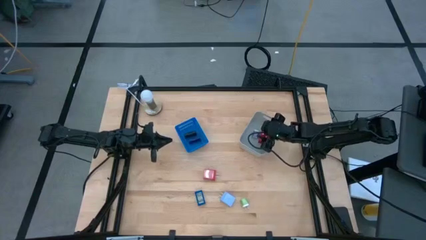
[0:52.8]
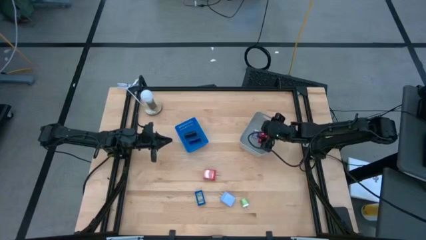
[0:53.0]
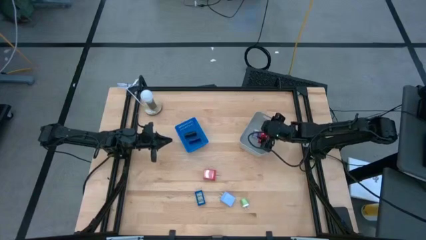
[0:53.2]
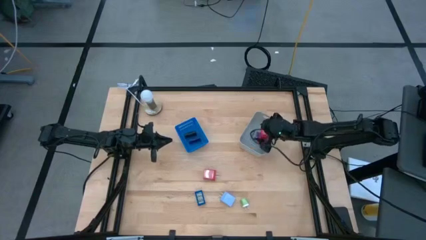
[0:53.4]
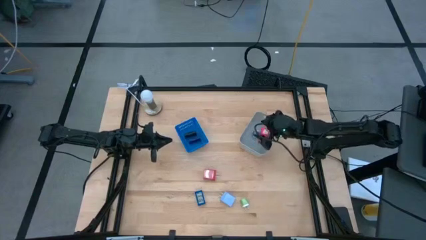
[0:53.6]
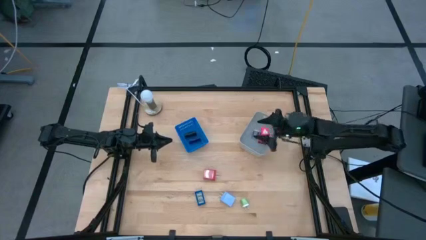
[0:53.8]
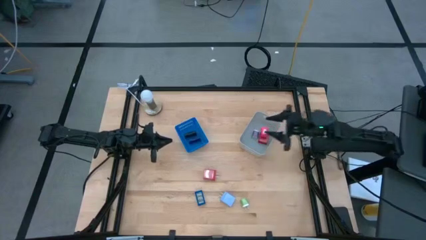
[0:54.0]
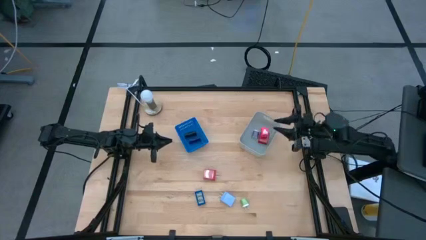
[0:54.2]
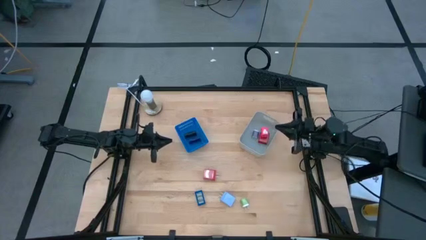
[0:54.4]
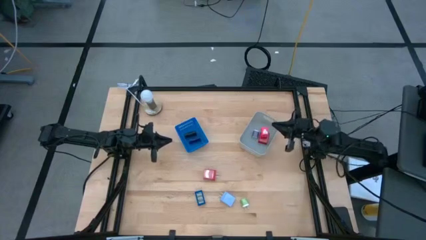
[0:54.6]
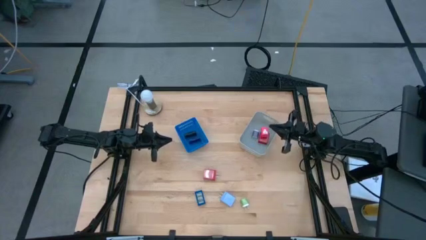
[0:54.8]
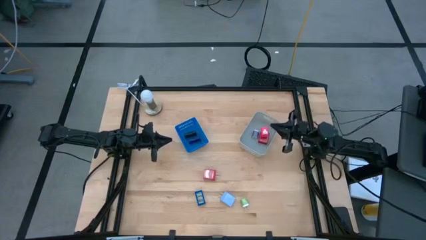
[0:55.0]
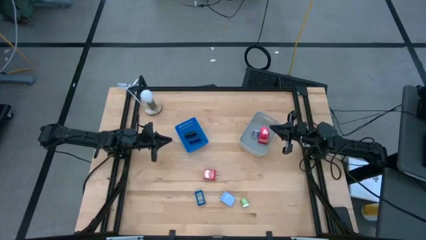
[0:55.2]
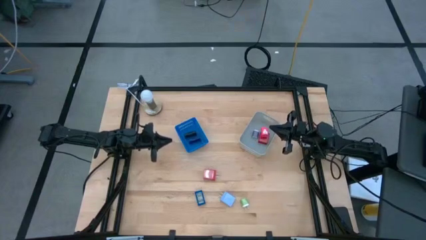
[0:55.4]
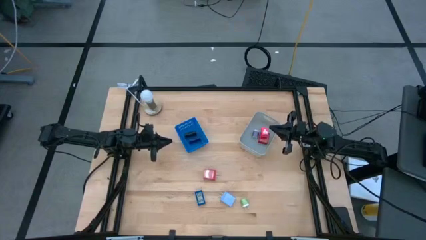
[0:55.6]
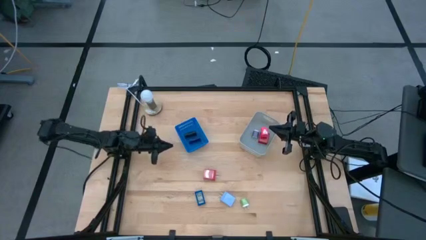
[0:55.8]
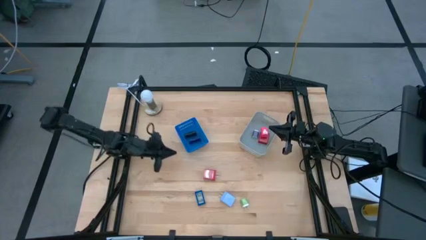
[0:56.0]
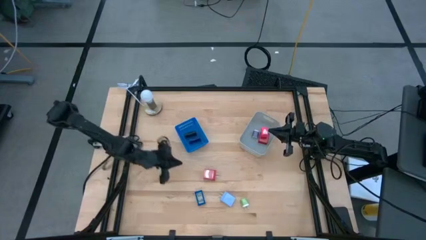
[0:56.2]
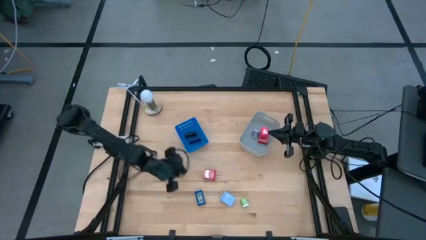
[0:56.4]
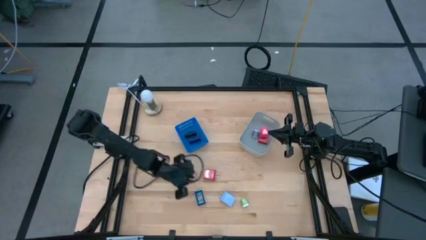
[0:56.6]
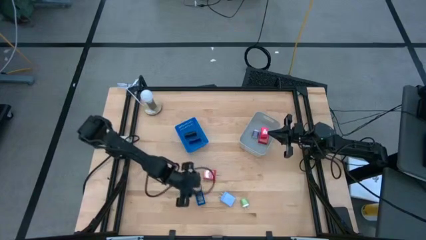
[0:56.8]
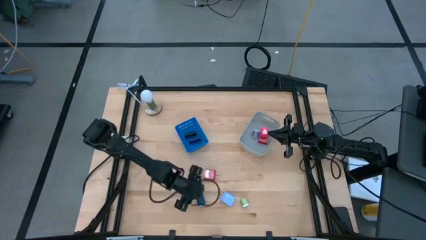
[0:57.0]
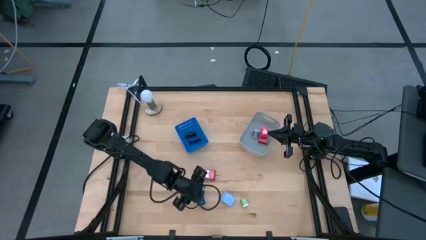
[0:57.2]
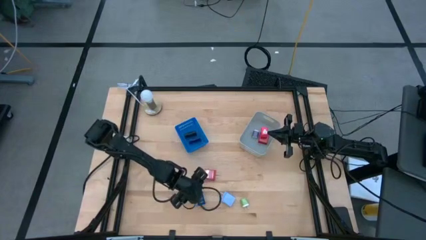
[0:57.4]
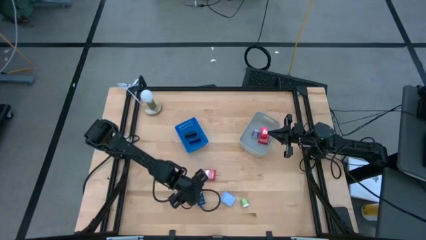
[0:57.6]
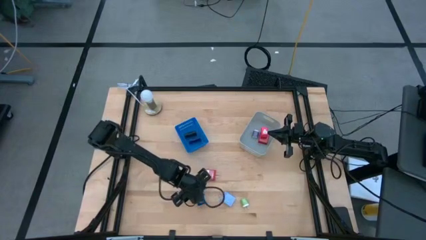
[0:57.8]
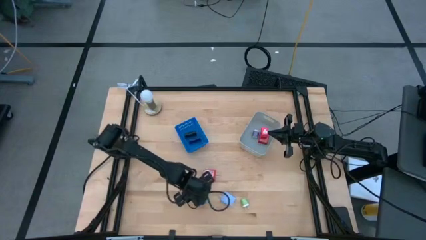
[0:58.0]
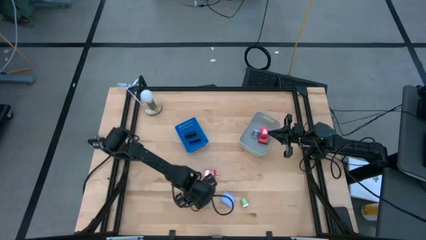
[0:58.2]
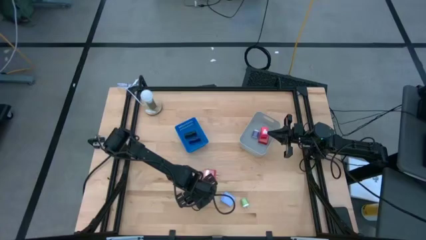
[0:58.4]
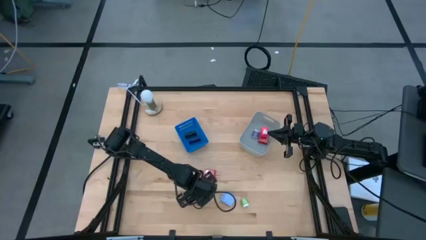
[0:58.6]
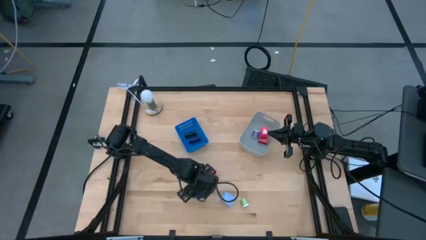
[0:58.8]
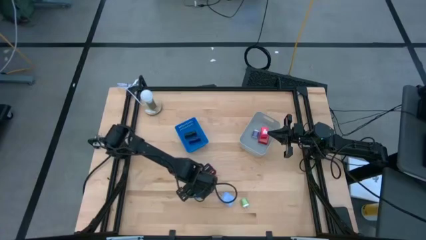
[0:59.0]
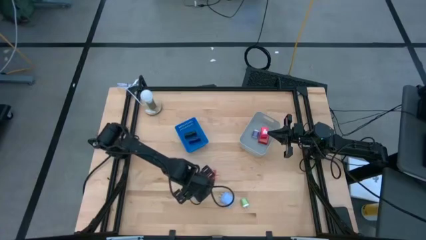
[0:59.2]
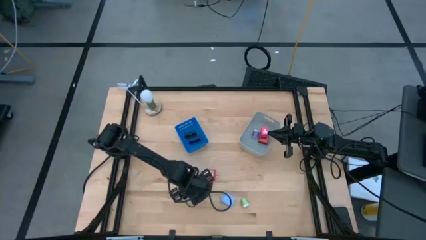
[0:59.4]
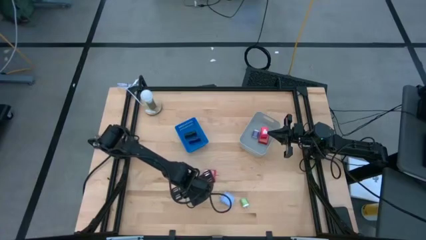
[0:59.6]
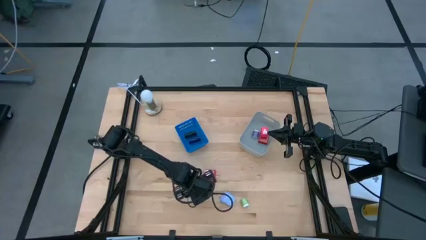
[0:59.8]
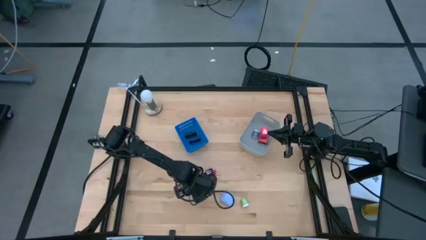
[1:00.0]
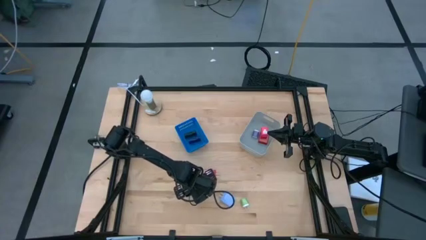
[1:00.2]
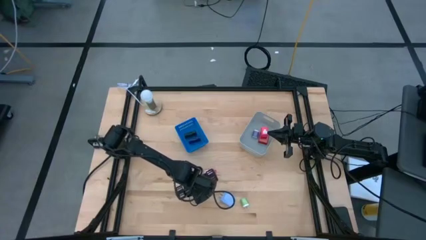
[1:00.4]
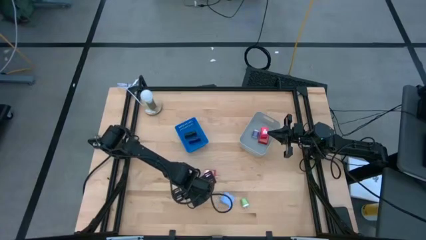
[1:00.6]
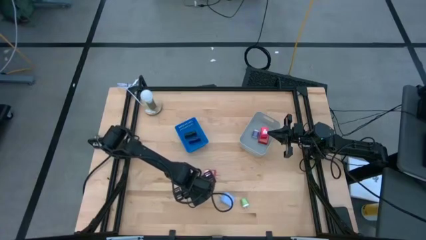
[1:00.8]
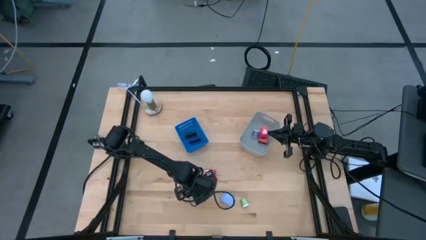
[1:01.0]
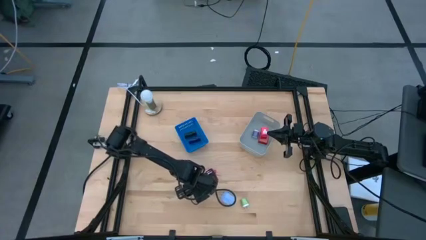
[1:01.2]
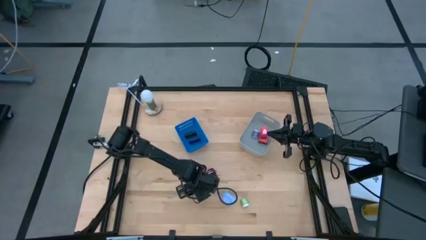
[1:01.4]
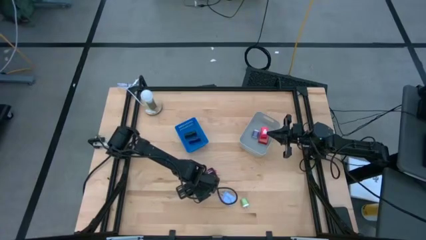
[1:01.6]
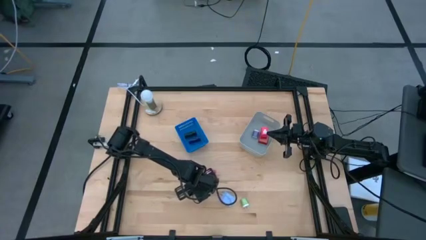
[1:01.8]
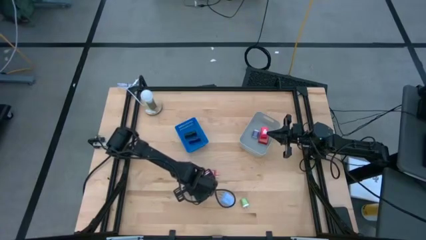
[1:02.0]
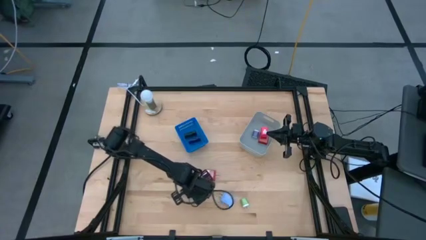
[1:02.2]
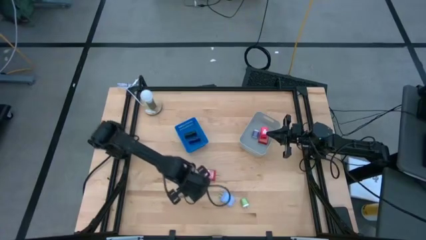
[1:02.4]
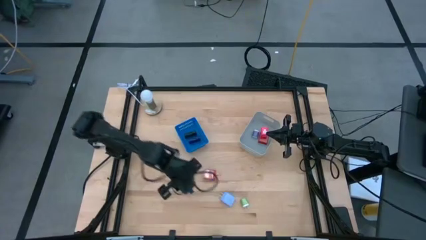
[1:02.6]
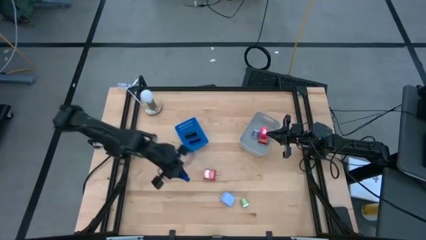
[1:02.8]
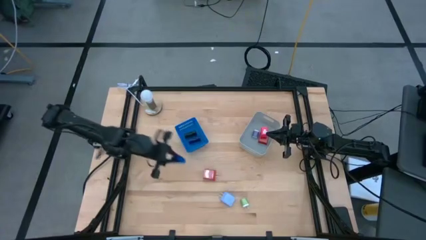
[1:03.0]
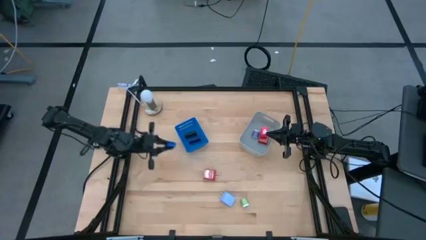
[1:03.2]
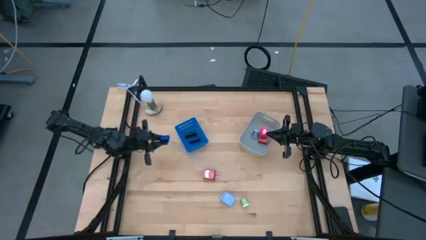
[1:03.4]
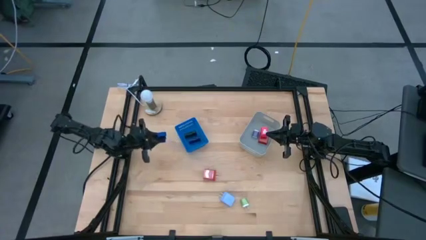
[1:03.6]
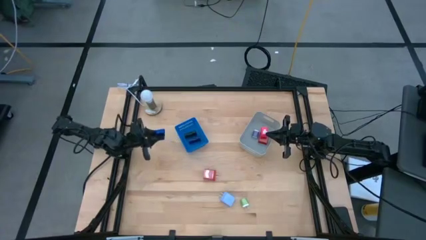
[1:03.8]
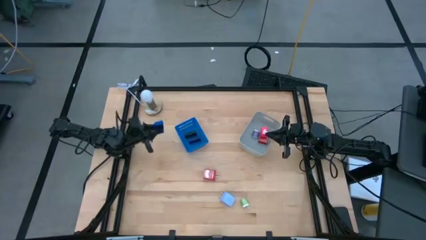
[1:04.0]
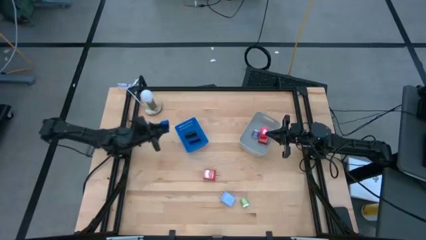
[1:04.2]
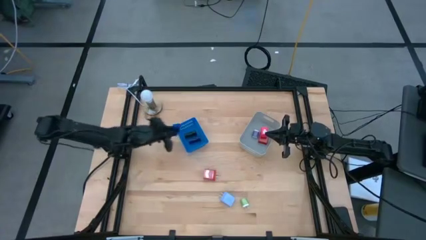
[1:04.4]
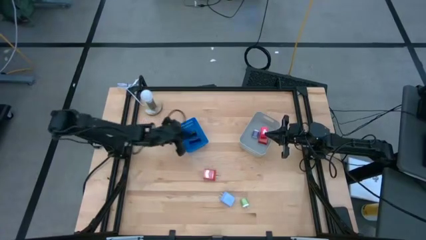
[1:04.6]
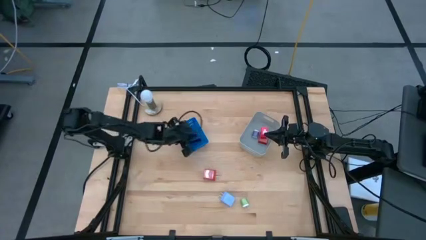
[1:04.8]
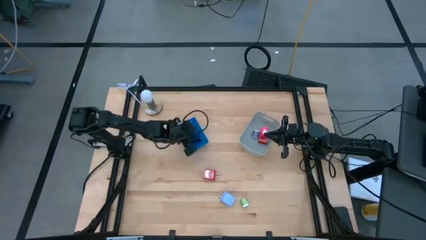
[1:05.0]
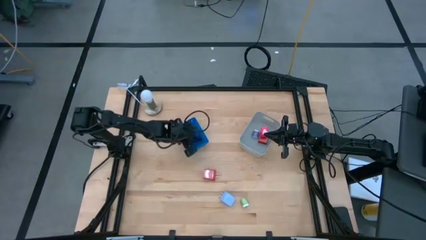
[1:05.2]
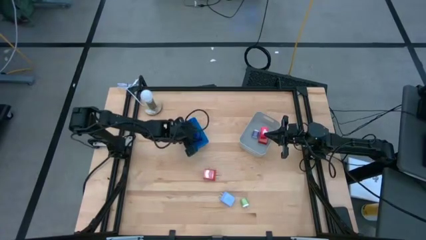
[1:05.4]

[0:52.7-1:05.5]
Task: Pick & Place Office items
Put the blue digital clock into the blue bin

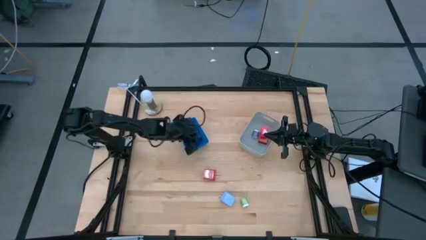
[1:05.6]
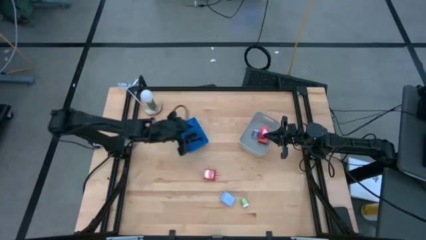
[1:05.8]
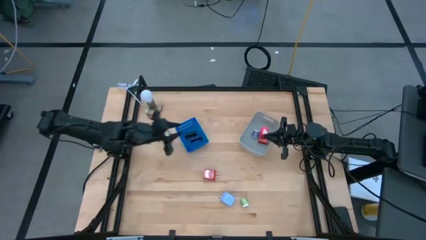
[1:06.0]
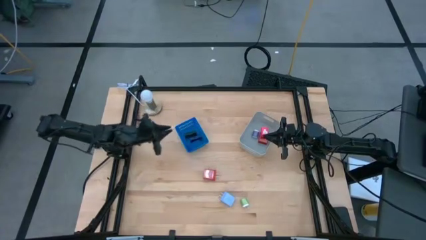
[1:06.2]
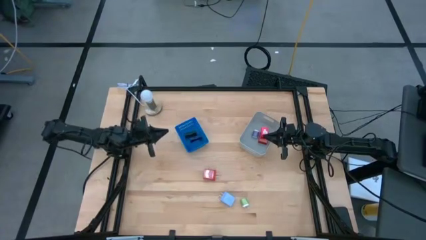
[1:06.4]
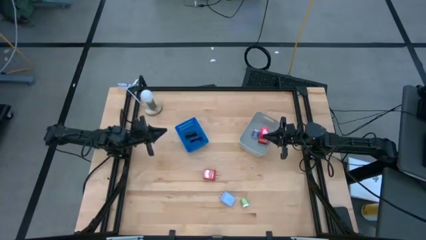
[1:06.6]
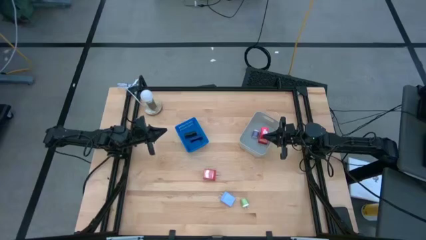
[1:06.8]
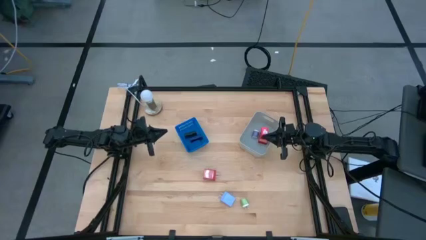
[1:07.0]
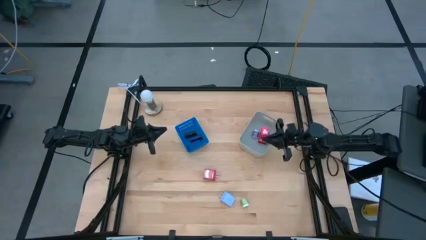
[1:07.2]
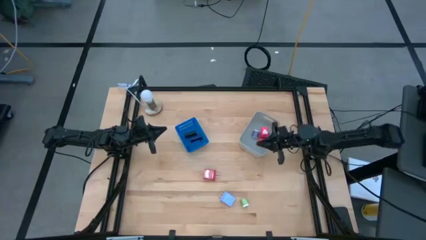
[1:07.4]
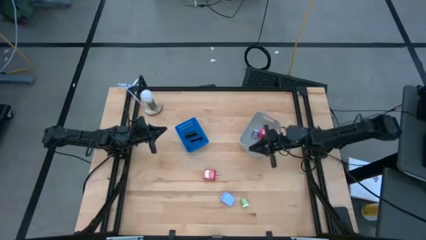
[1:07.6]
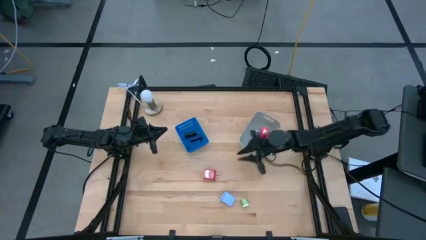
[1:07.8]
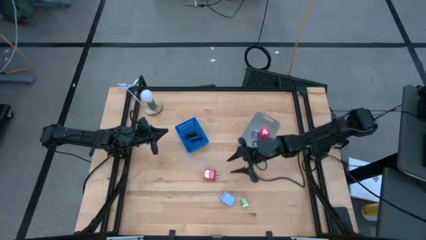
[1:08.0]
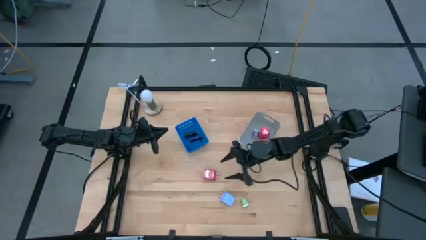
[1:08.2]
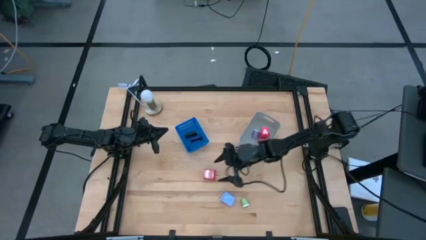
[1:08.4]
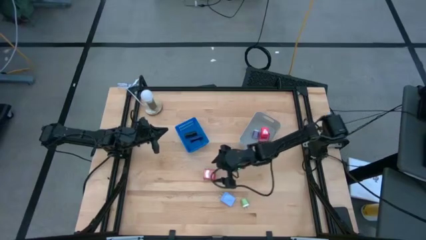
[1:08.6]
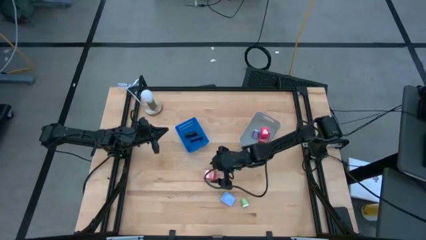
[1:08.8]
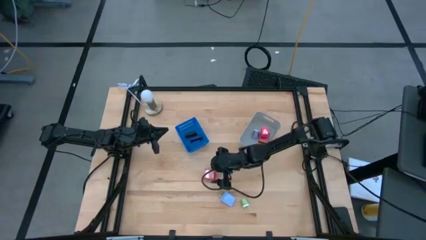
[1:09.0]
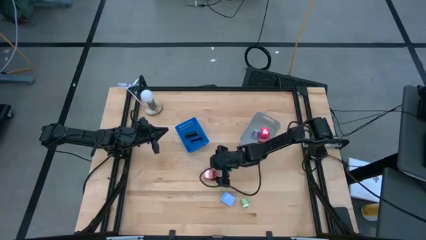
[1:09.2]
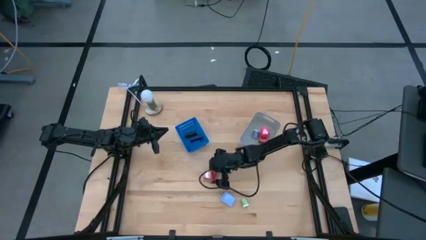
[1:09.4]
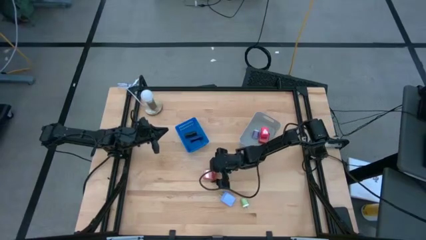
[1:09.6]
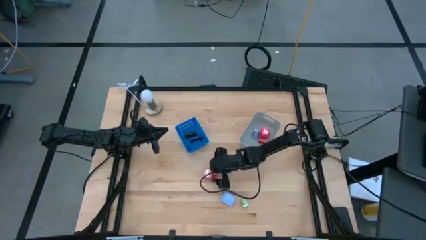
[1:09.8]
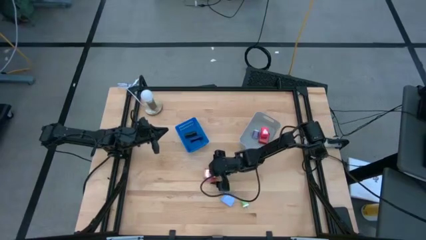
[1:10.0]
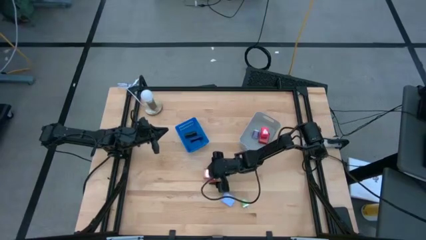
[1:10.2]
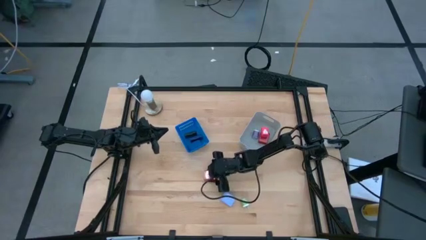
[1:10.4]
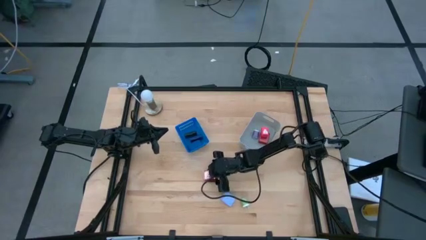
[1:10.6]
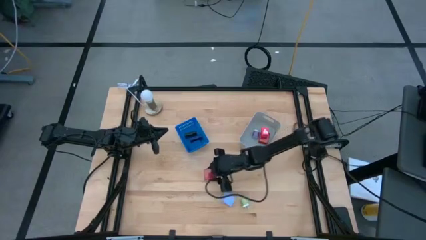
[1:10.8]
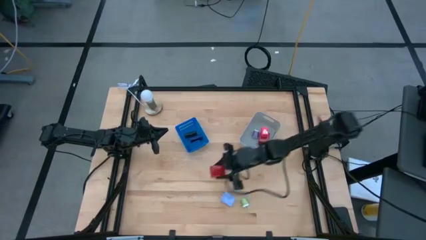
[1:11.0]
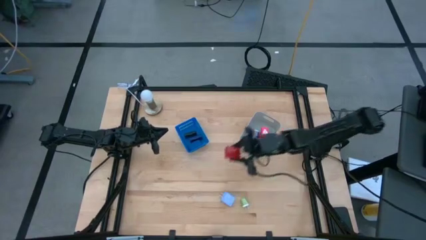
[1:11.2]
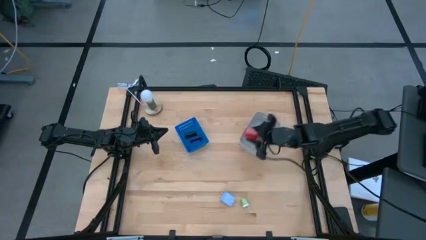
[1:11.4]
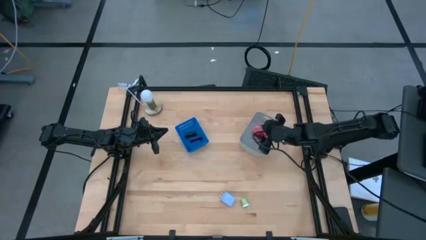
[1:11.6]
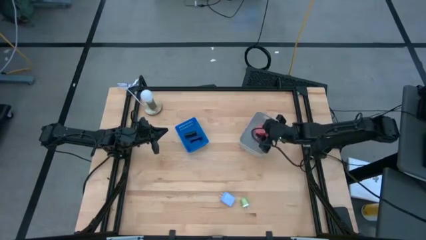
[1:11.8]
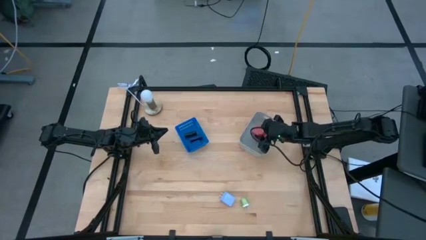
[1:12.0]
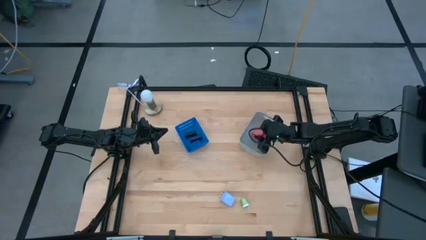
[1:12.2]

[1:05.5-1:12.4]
Put the red charger adapter into the gray bin
